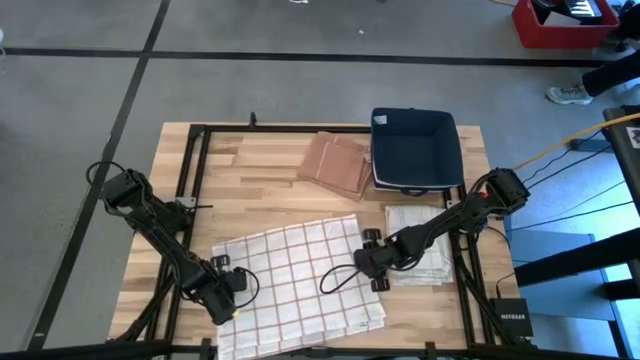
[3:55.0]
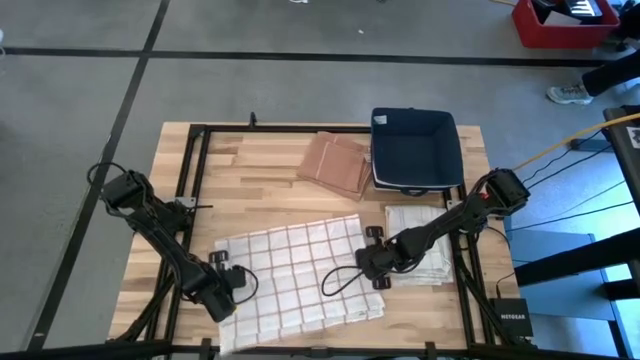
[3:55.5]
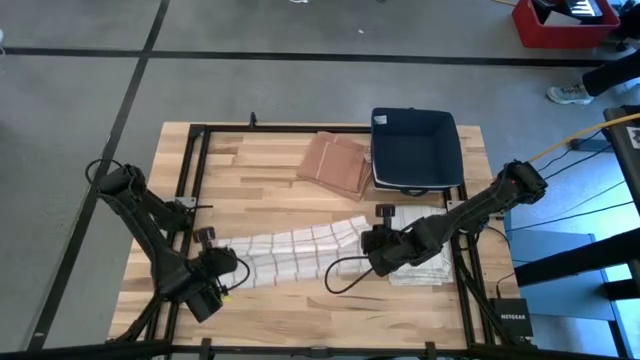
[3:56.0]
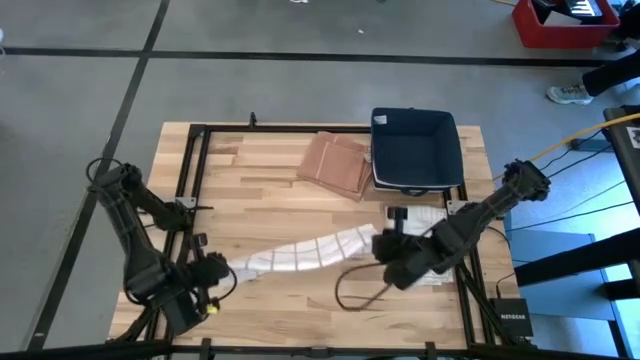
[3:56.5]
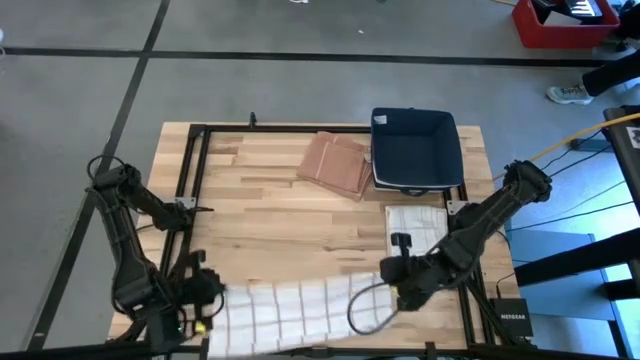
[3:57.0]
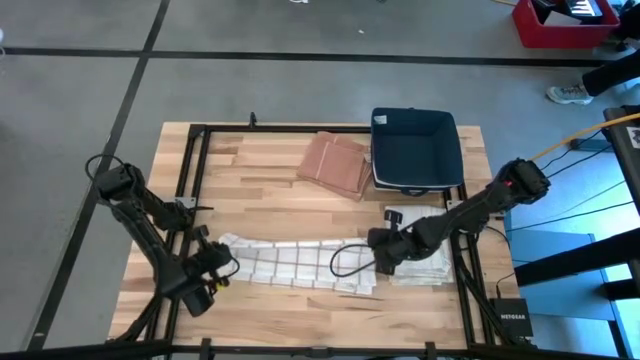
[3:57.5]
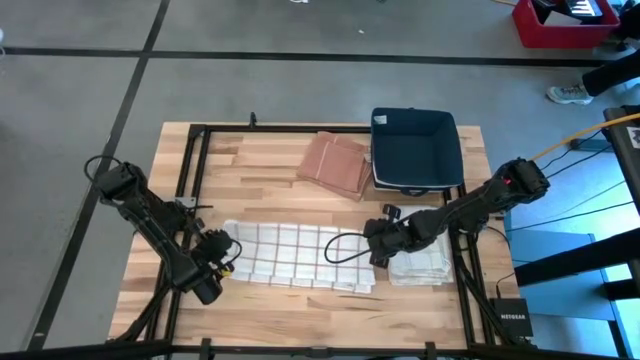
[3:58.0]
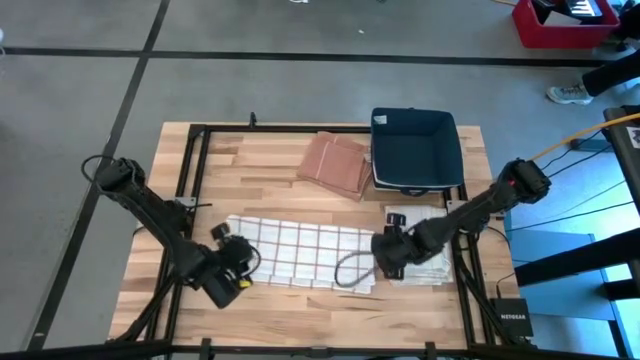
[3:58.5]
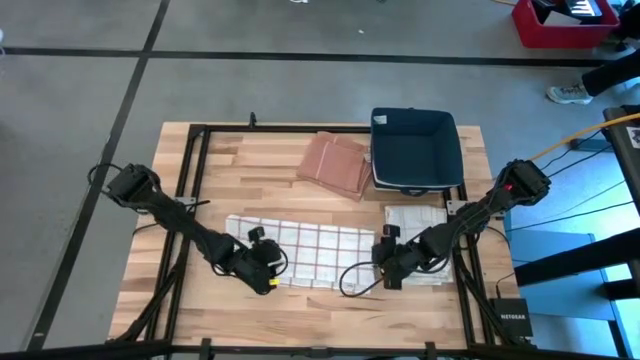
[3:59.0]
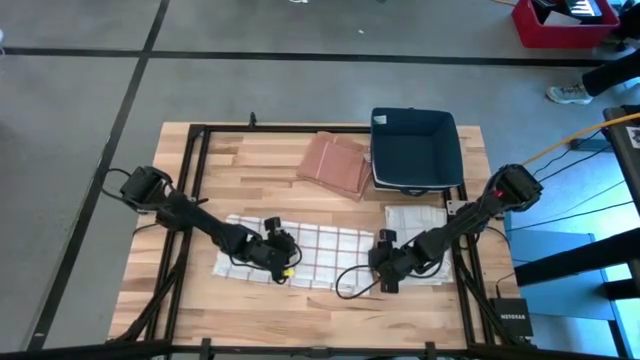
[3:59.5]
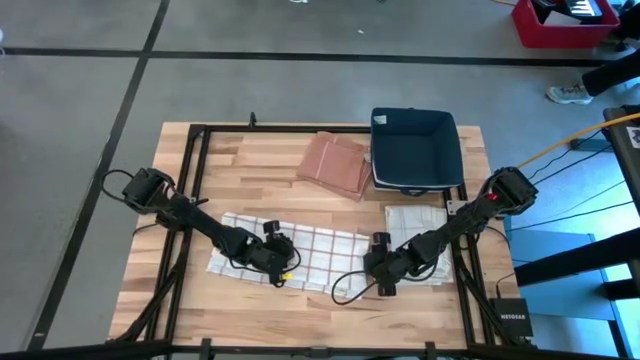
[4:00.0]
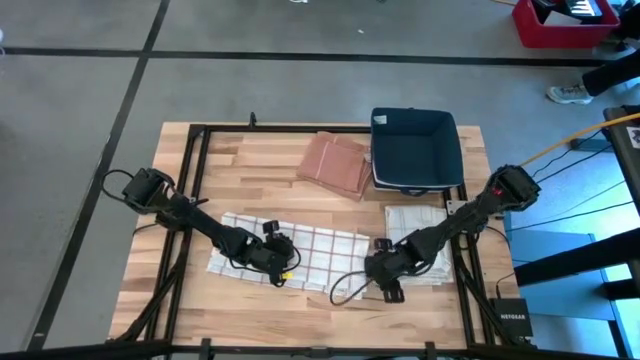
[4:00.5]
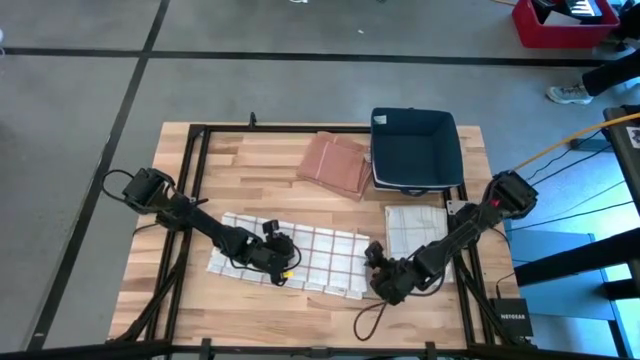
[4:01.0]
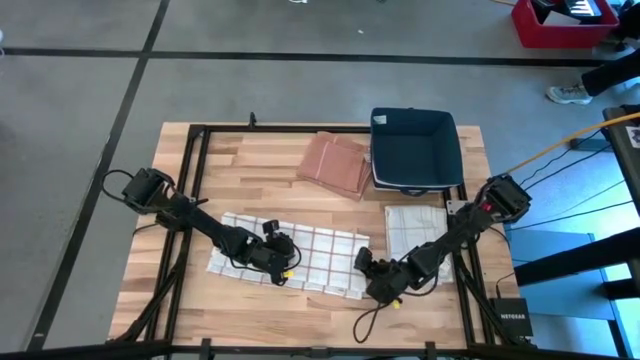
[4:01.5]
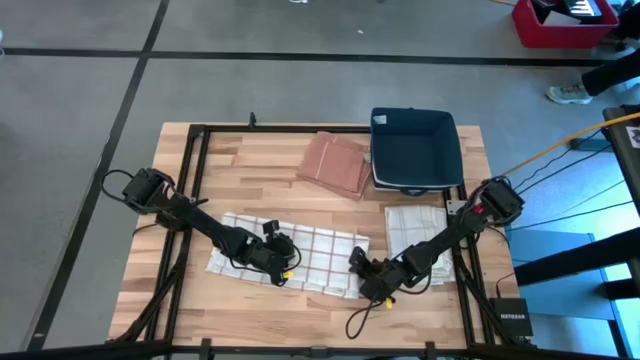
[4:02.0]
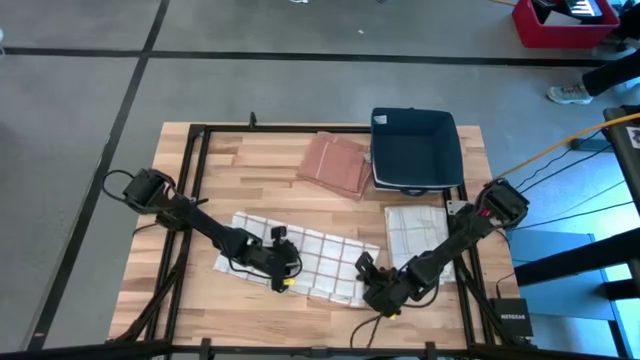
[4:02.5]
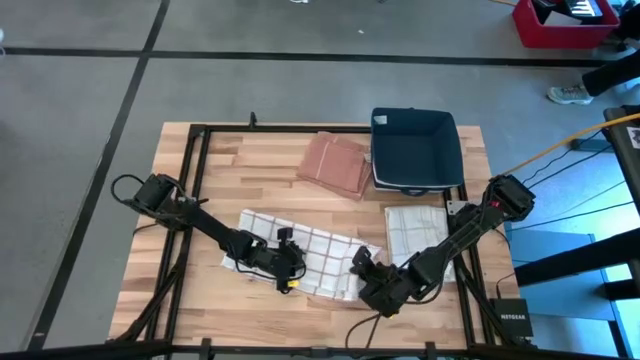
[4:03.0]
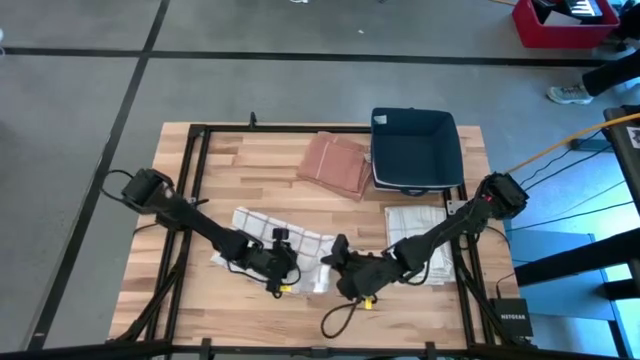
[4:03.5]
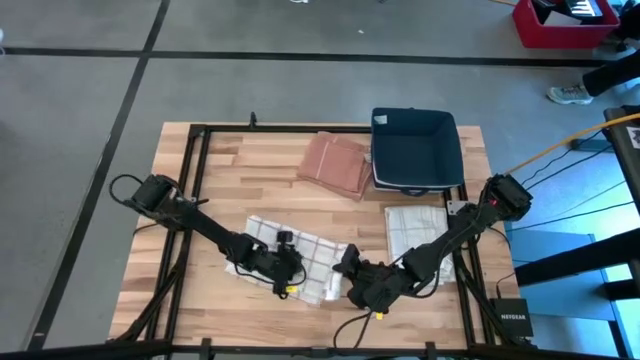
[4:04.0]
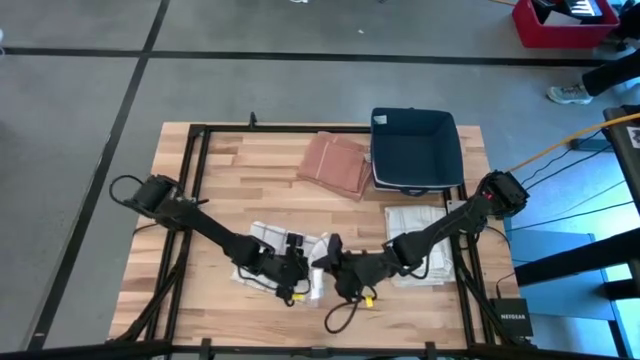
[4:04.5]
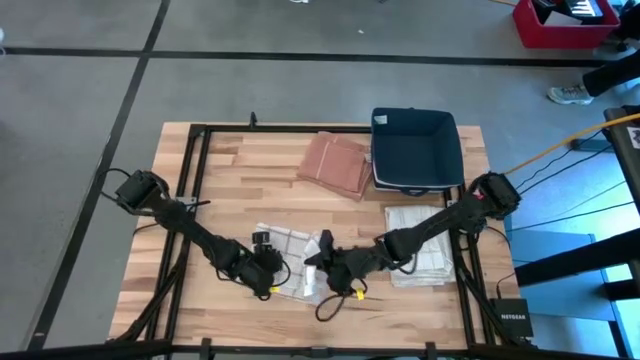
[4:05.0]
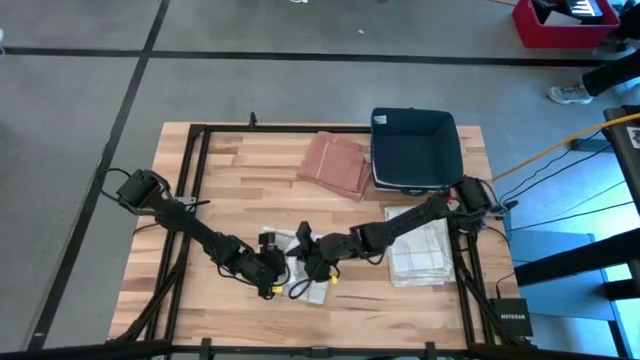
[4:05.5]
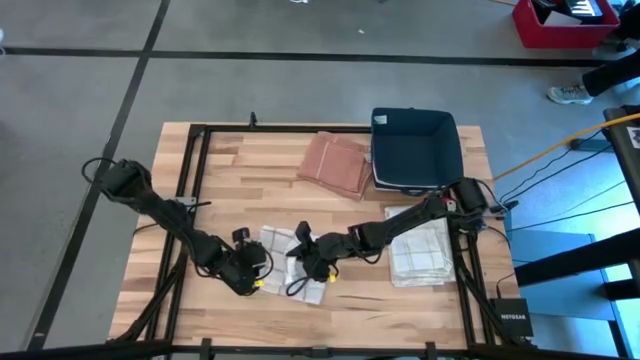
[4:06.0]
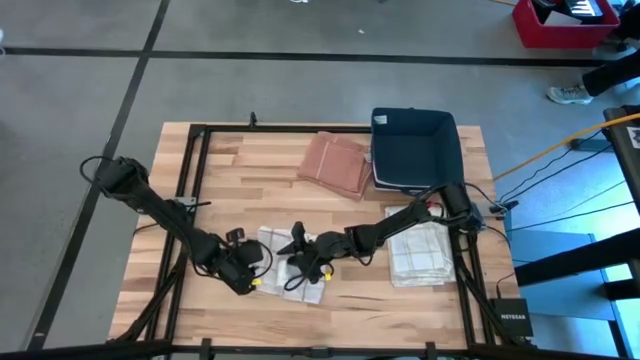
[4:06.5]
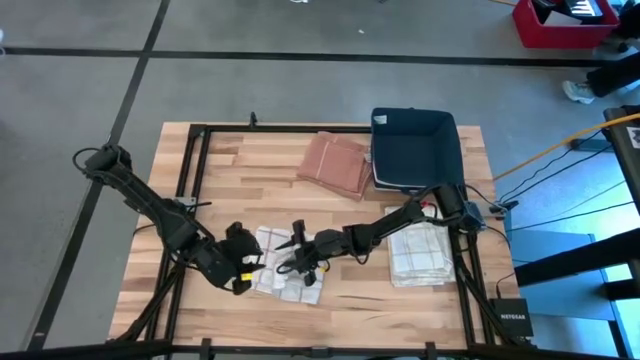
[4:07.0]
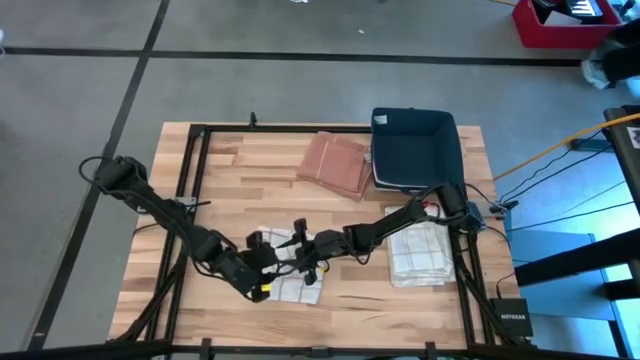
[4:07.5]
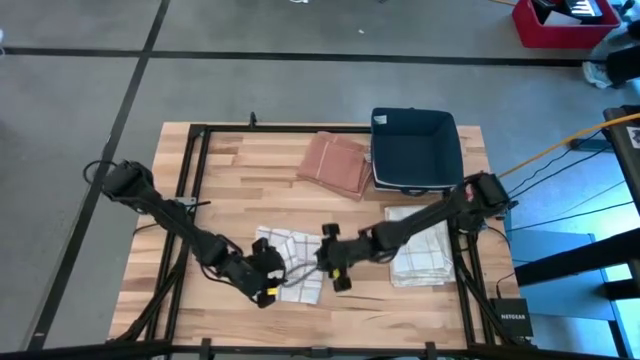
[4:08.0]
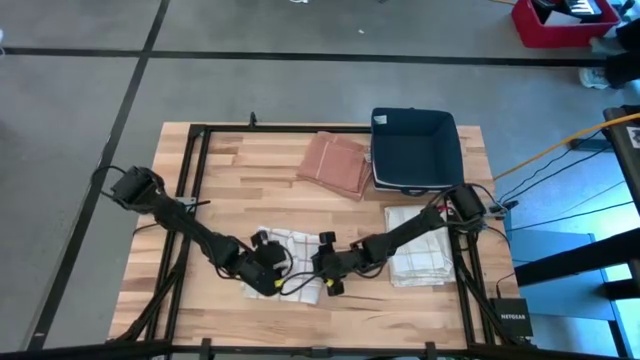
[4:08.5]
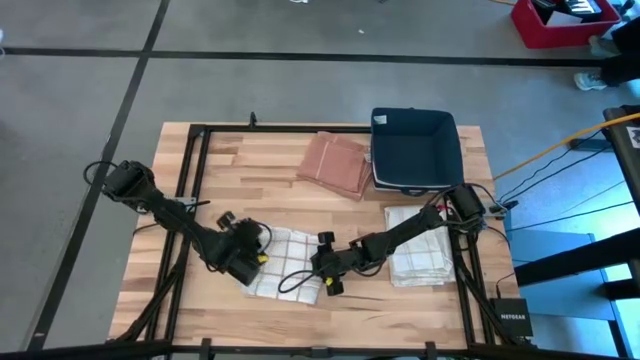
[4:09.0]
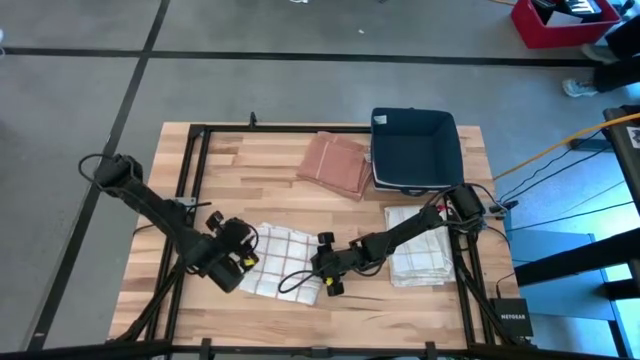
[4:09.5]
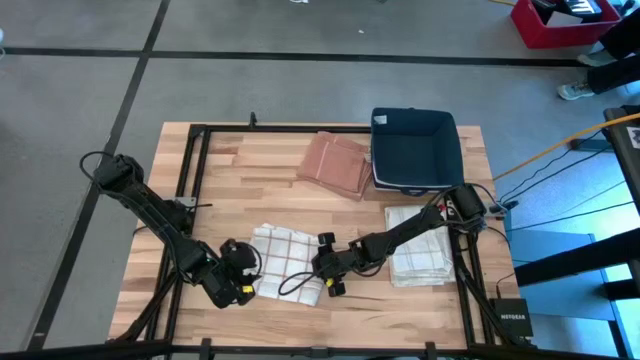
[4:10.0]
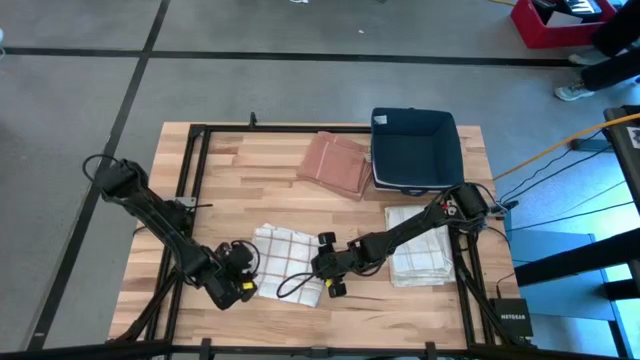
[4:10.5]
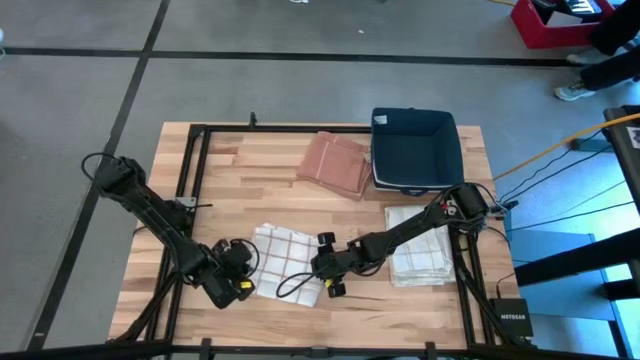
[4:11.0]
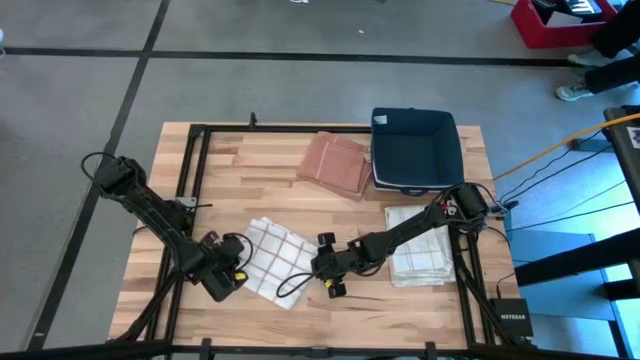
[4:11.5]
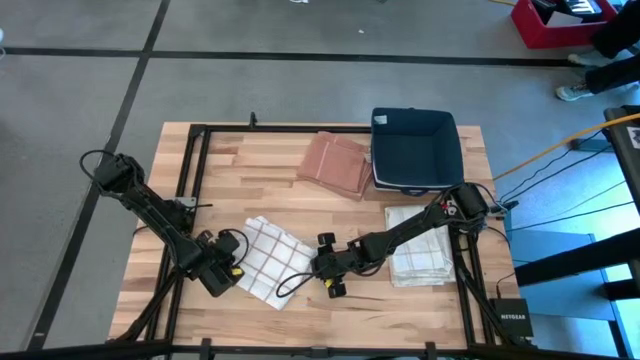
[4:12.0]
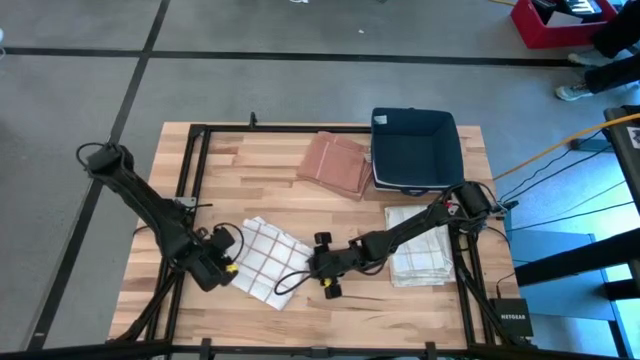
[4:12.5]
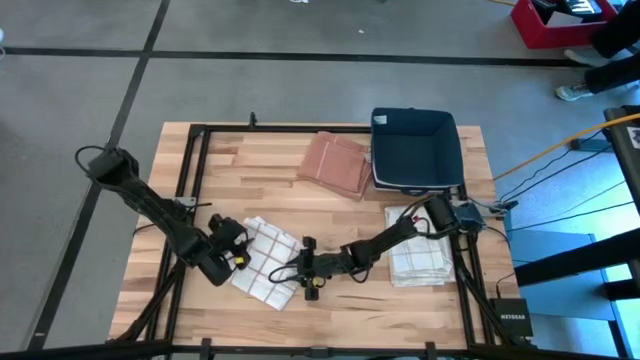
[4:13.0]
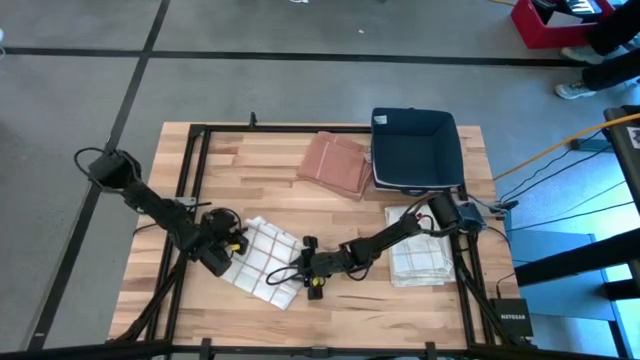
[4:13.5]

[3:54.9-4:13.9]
Task: Fold towel
Fold the white towel

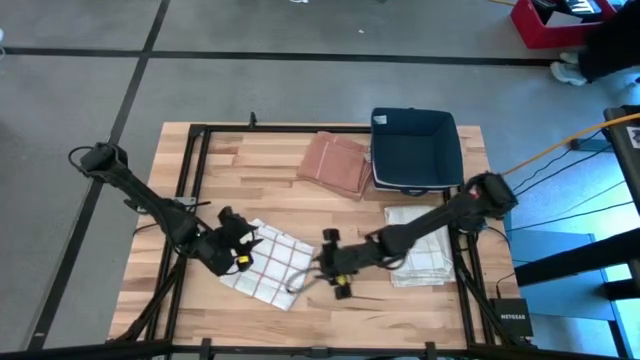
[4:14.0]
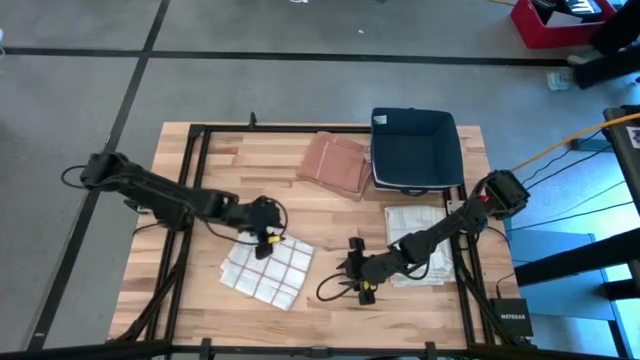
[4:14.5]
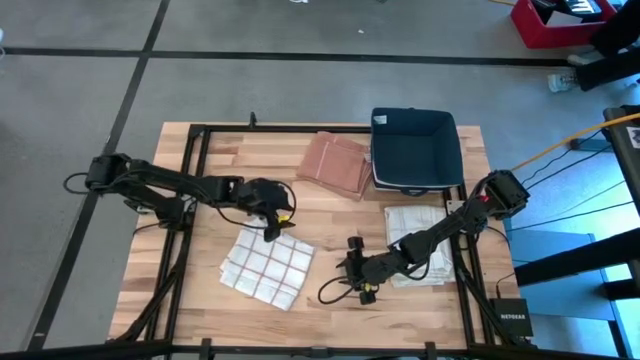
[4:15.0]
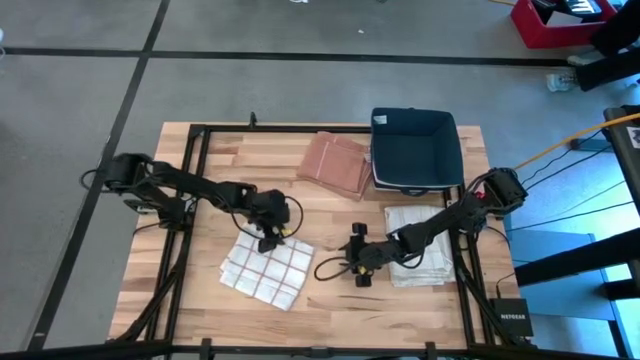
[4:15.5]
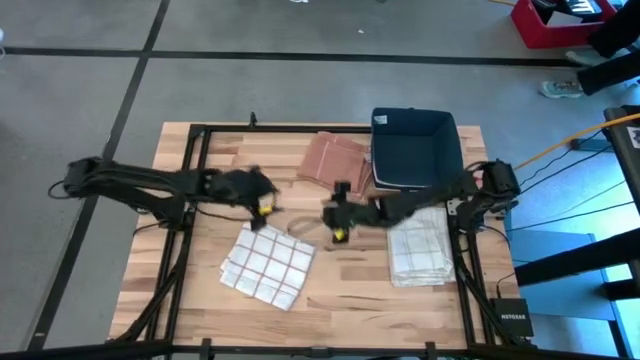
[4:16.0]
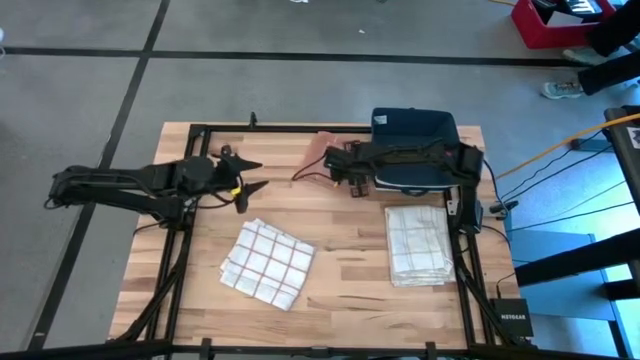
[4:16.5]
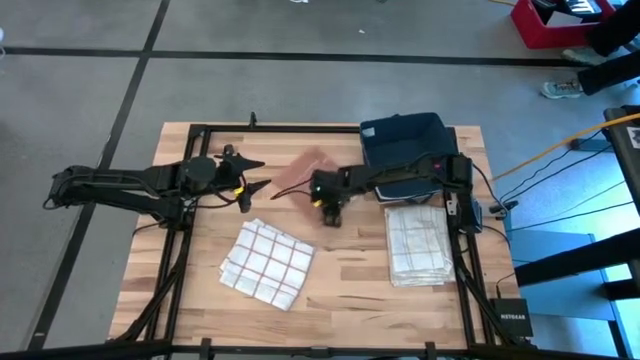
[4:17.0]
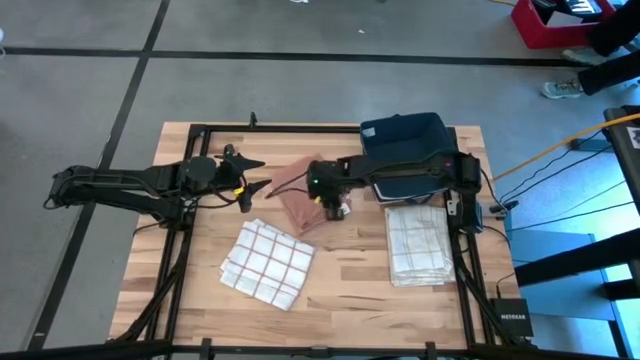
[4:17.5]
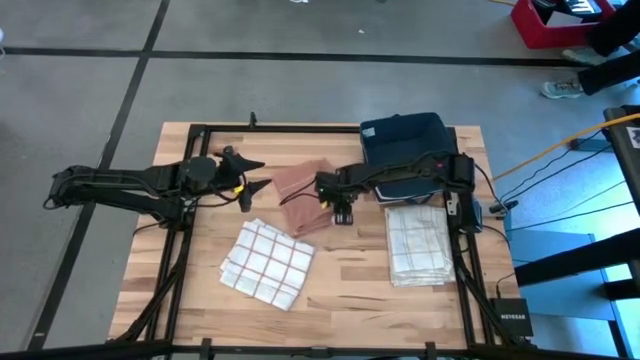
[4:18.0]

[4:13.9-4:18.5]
Adjust the brown towel
